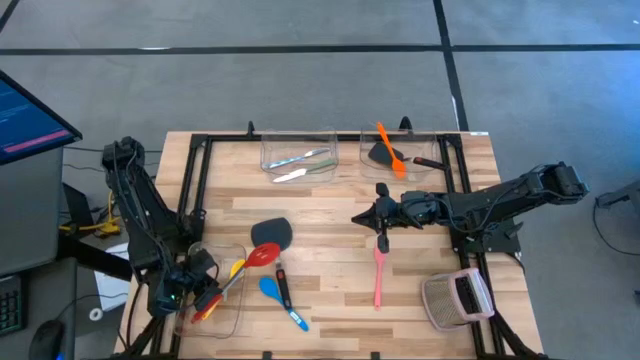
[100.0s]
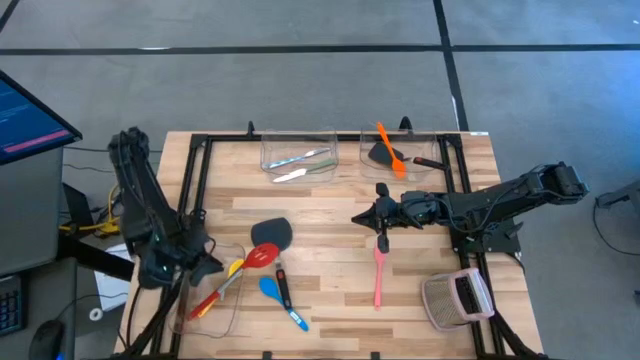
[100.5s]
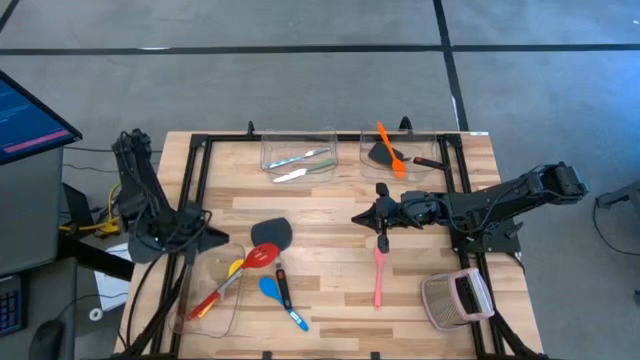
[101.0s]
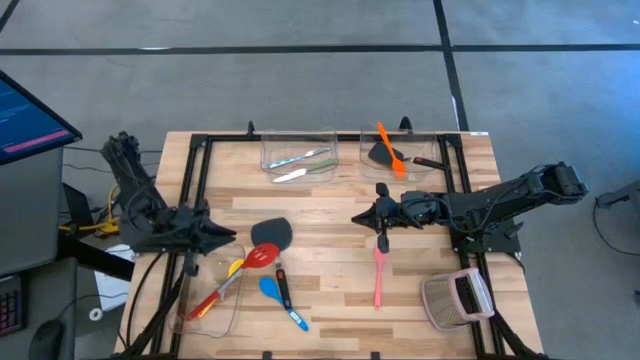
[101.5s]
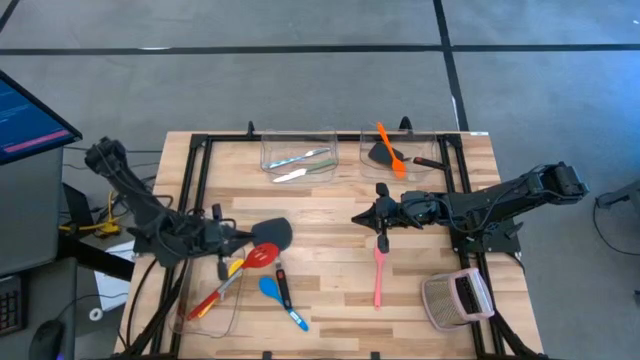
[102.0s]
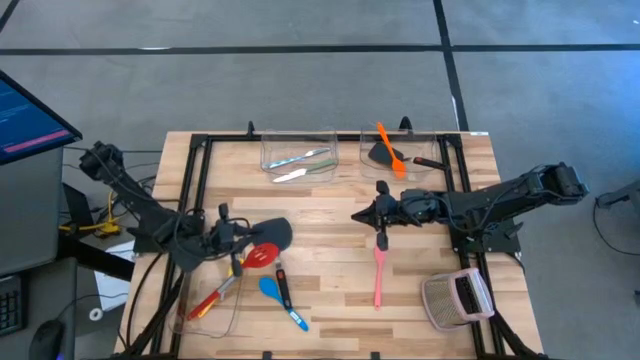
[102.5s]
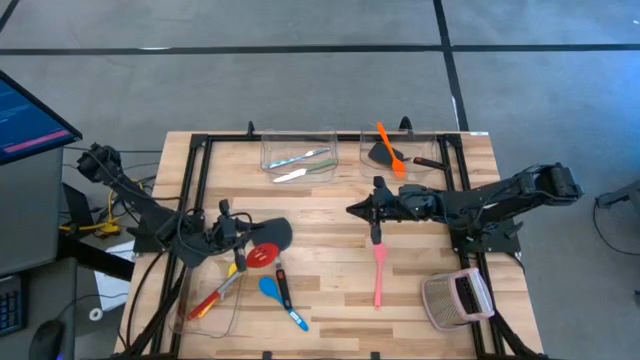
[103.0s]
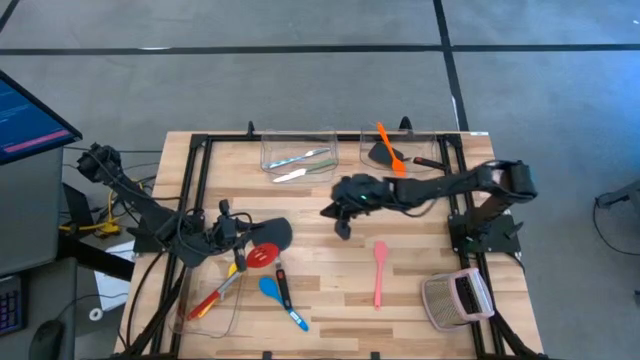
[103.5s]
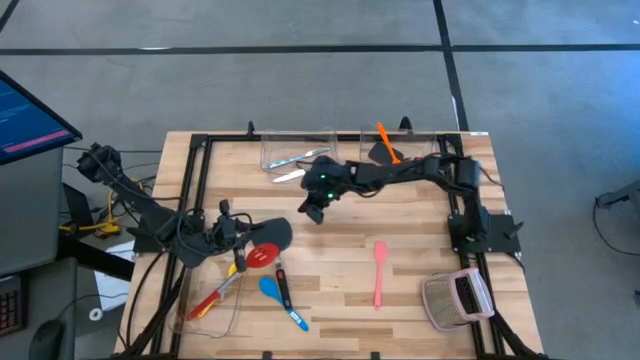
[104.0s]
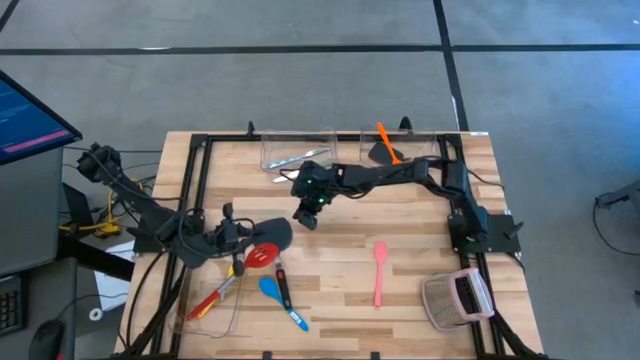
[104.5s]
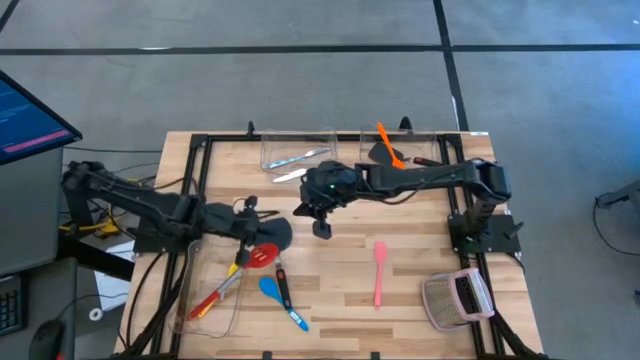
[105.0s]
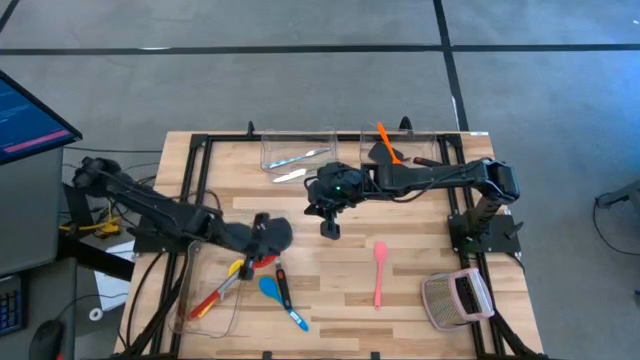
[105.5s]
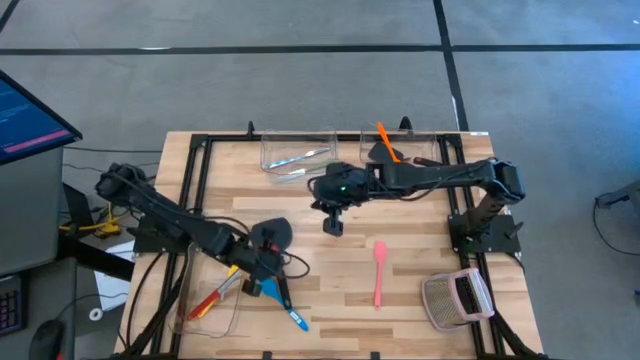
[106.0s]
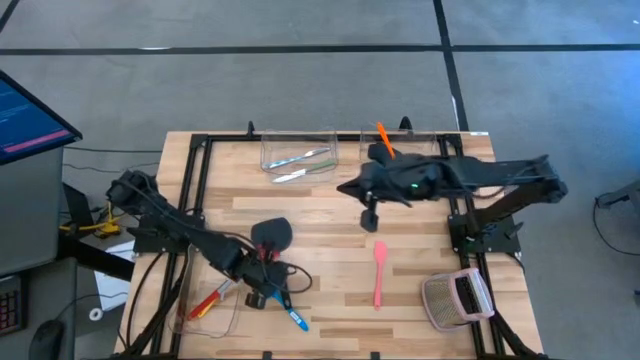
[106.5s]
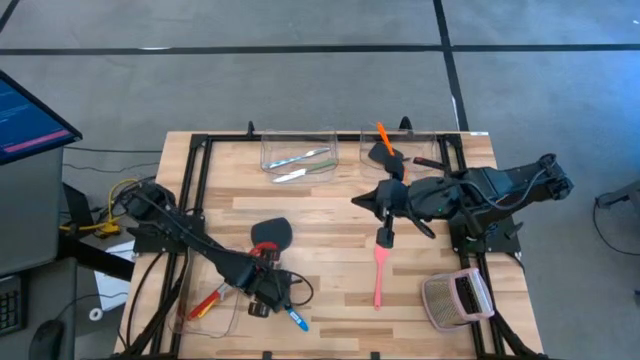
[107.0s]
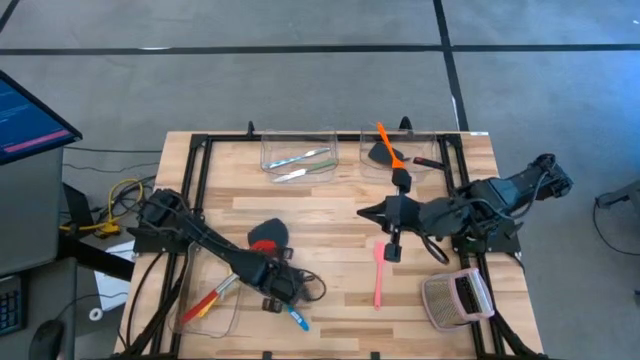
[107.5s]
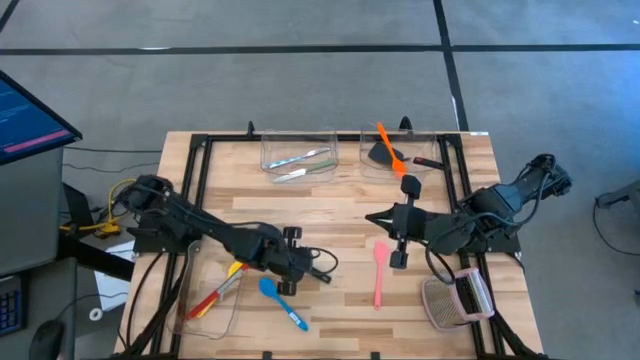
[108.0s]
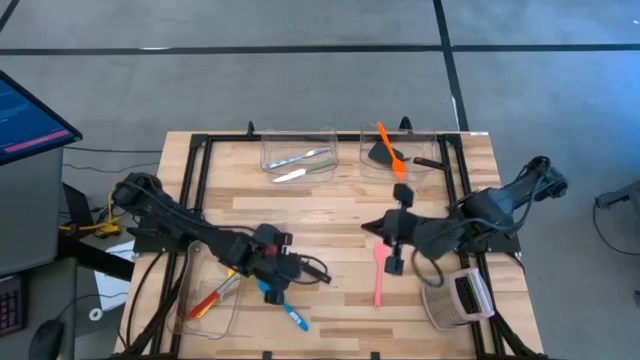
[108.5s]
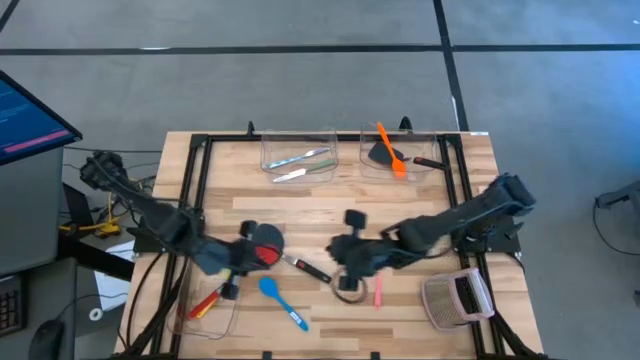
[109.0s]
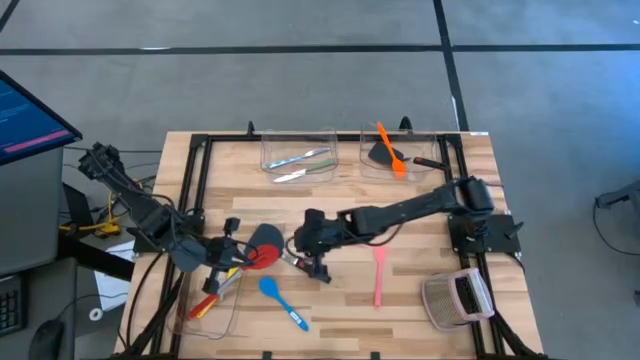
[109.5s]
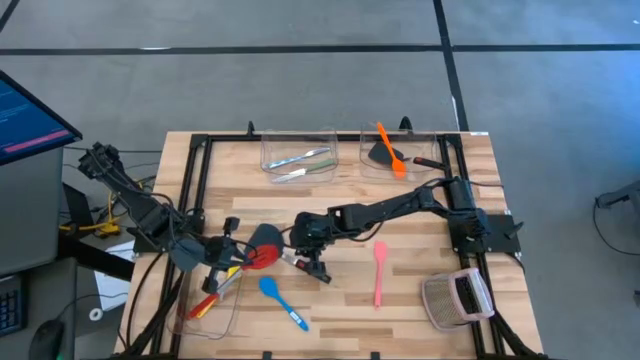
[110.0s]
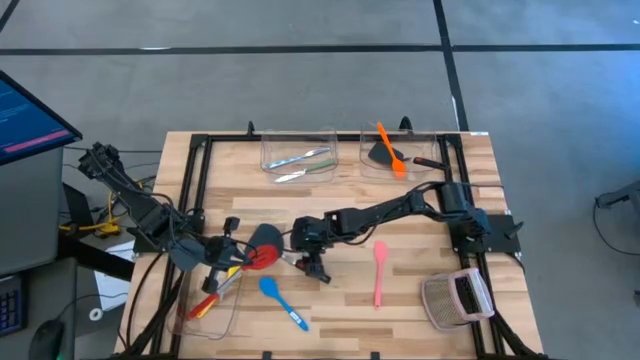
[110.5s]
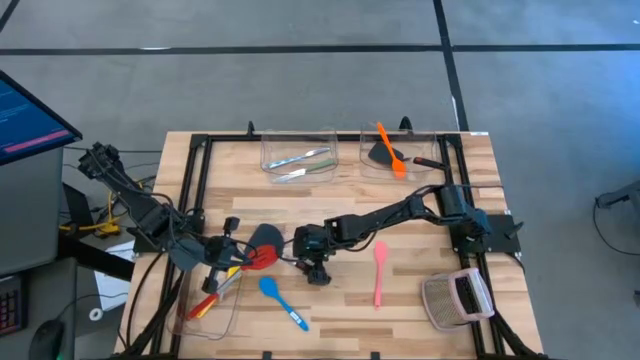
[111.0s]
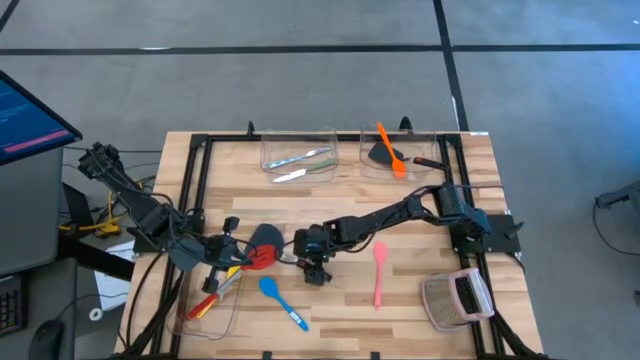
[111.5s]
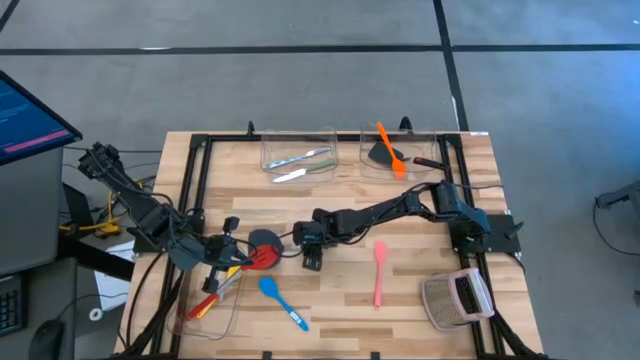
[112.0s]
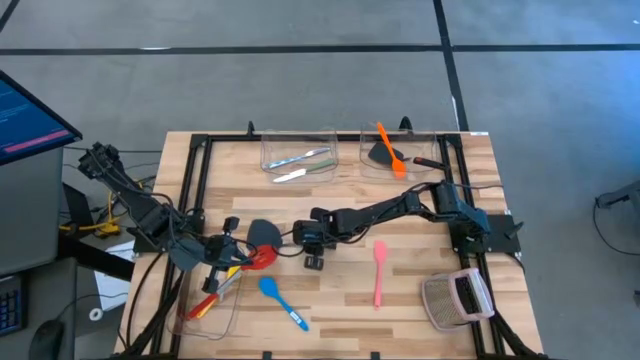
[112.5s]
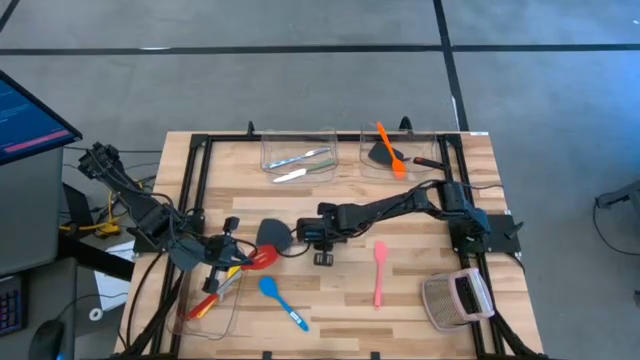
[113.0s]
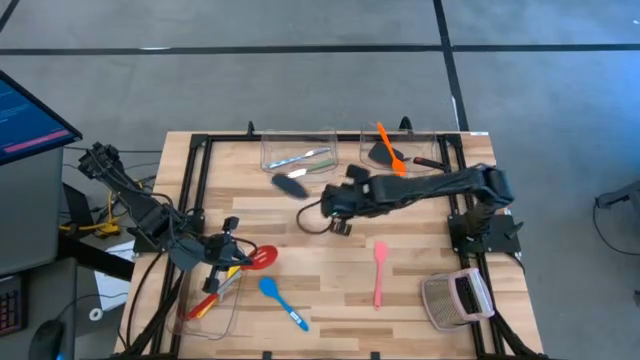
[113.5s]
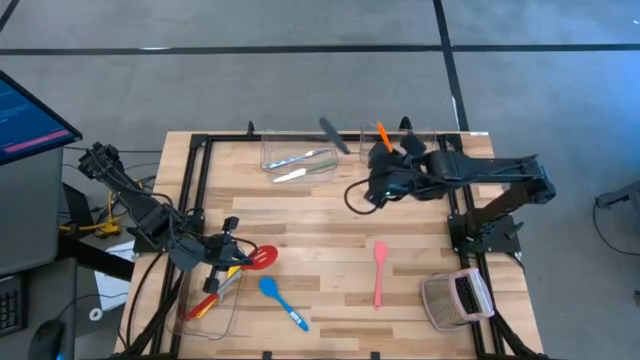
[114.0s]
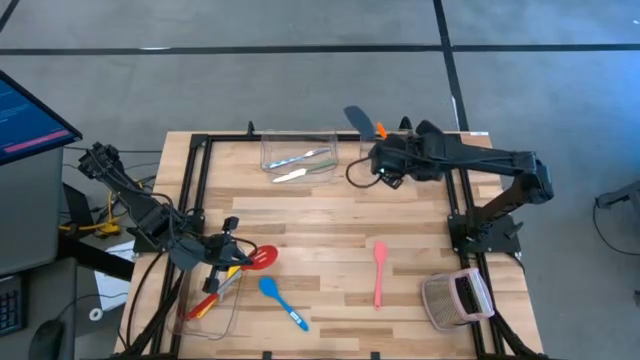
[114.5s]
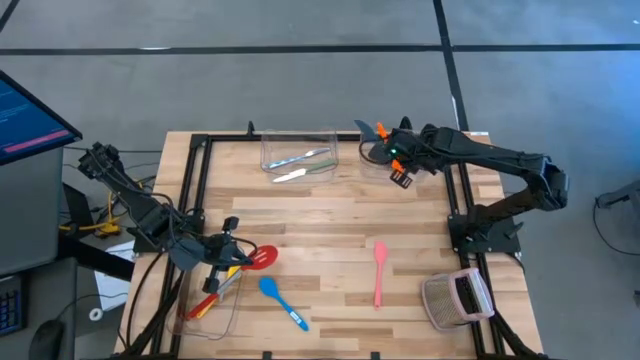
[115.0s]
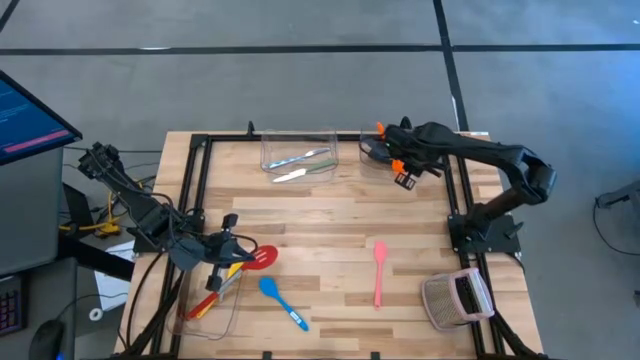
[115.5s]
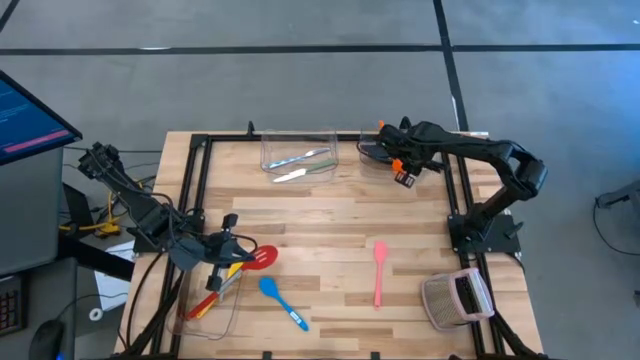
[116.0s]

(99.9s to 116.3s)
Task: Pick & Place Kitchen Items
Put the black spatula into the top right transparent bin
